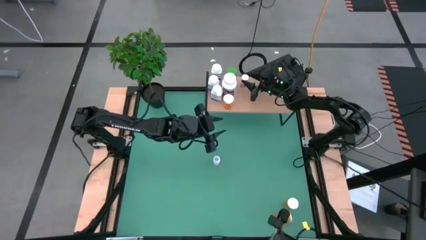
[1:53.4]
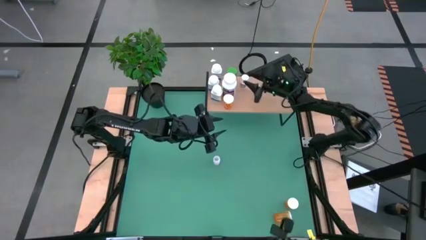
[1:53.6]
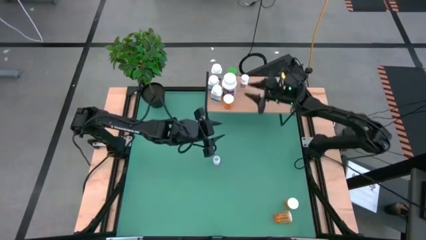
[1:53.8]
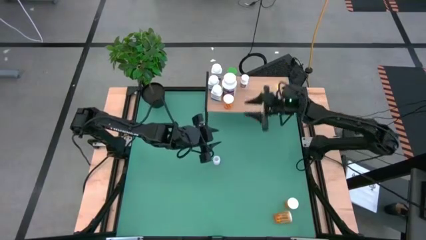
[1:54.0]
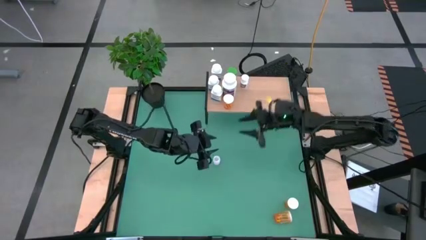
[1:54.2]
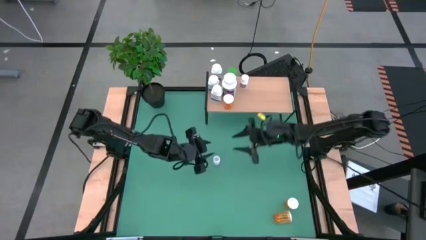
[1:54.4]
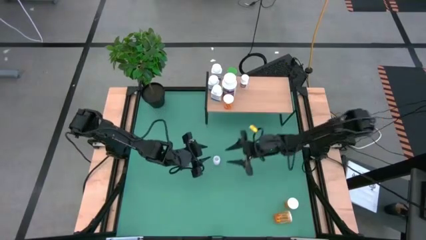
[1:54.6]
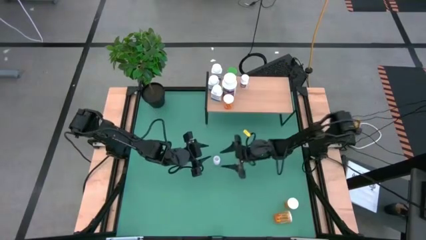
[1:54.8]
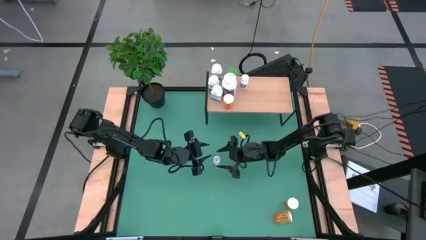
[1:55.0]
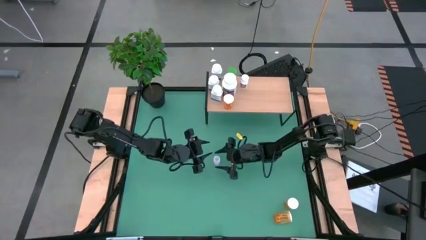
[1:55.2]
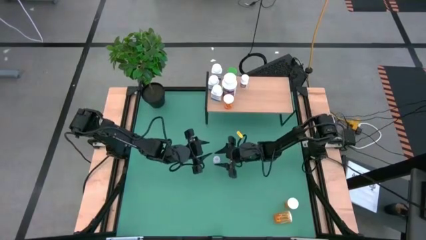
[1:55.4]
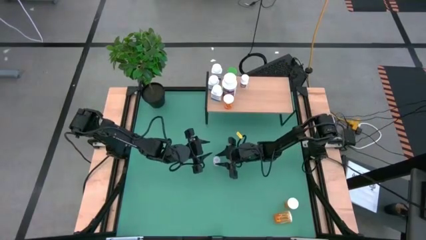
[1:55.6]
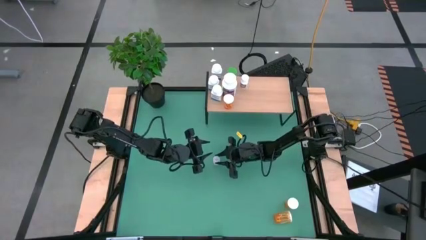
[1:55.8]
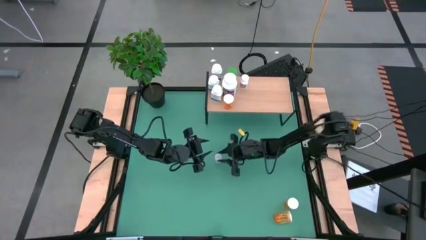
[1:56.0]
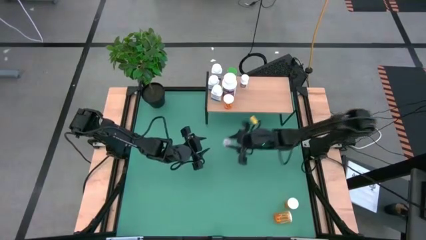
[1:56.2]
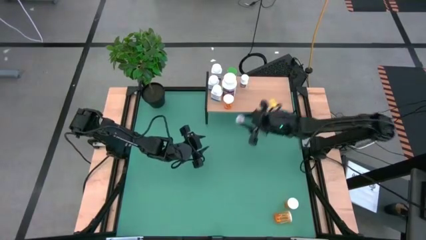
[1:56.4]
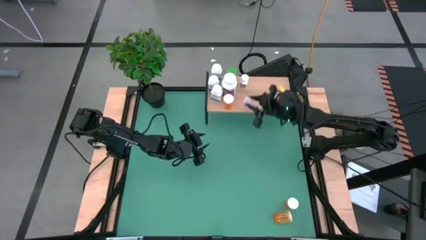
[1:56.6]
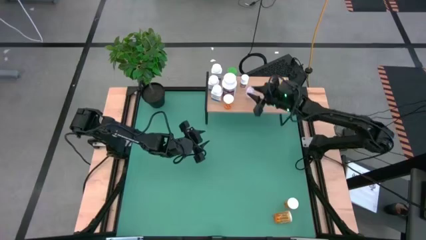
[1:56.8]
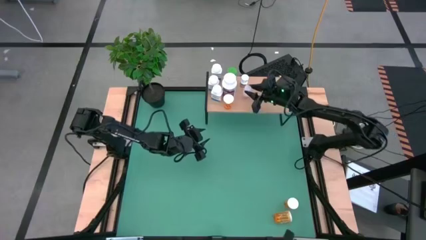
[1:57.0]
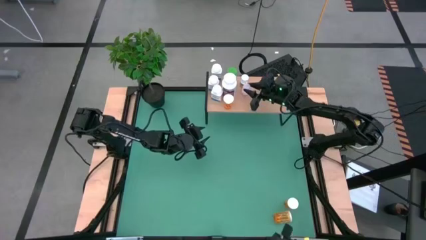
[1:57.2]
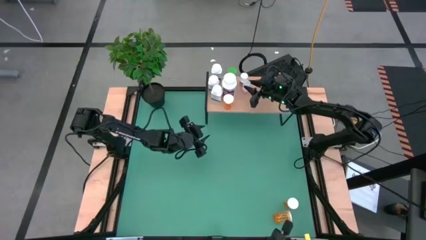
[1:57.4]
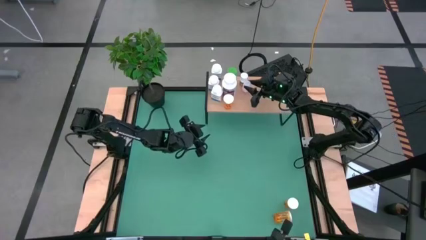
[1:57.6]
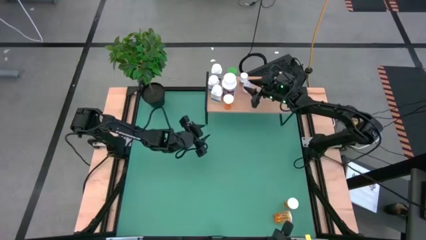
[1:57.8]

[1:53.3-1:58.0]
Task: Pick and place medicine bottles onto shelf by color
Put the transparent pill bottle on the shelf

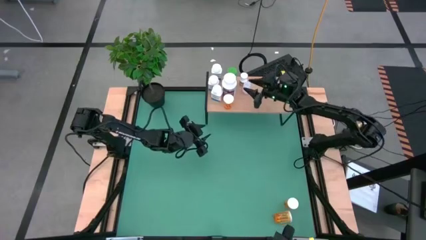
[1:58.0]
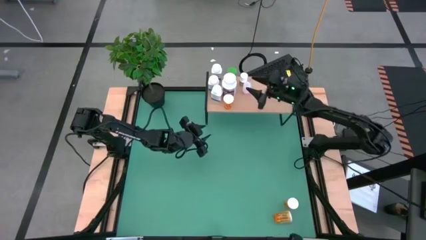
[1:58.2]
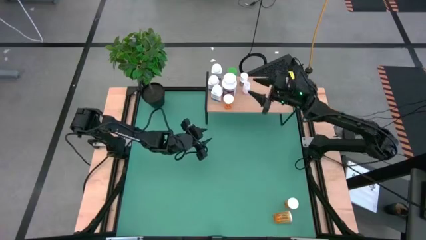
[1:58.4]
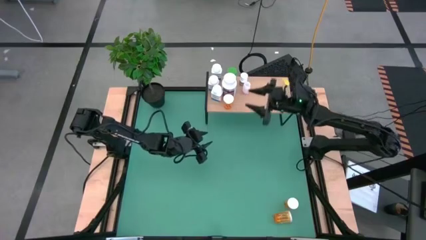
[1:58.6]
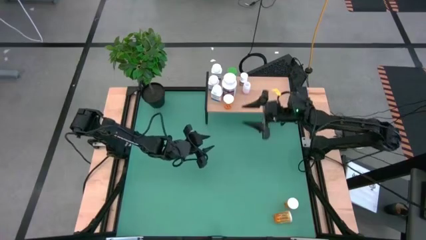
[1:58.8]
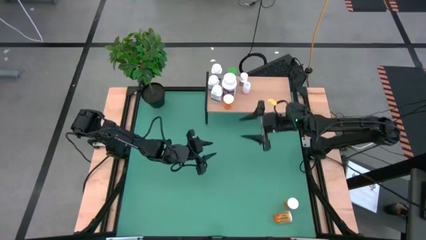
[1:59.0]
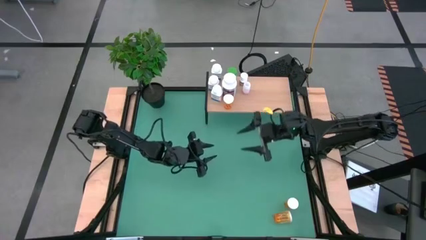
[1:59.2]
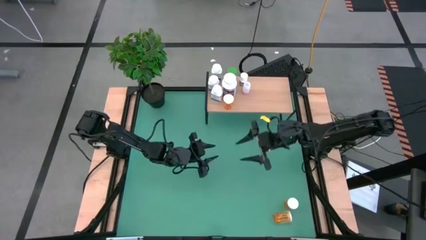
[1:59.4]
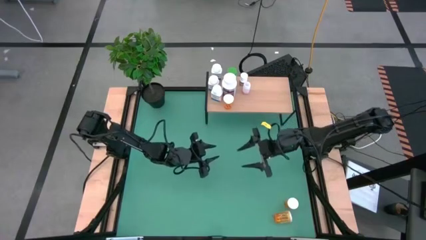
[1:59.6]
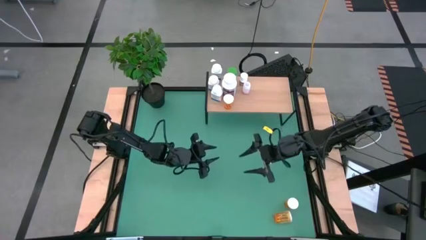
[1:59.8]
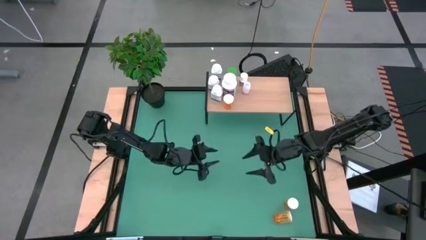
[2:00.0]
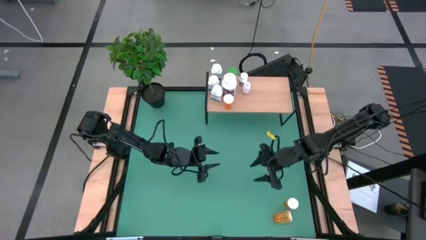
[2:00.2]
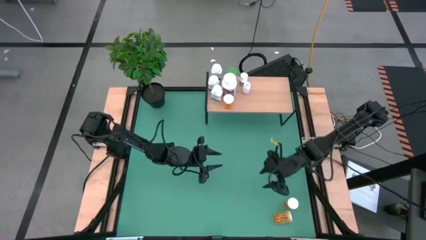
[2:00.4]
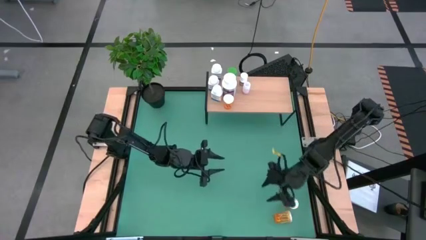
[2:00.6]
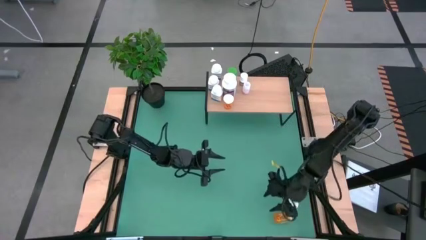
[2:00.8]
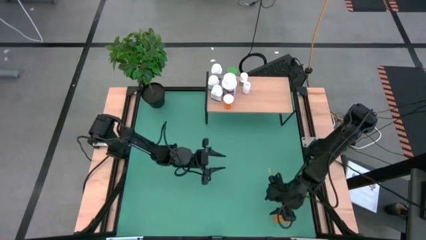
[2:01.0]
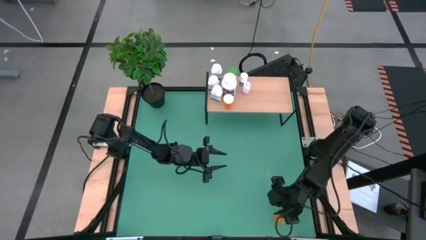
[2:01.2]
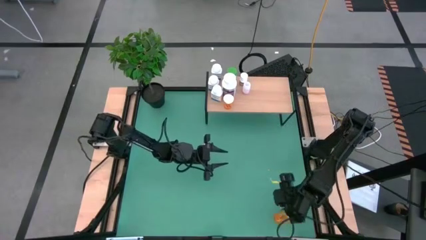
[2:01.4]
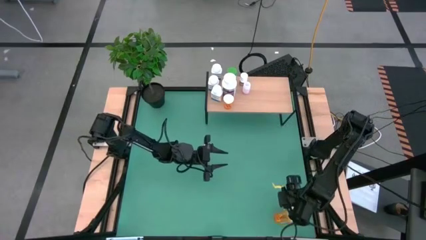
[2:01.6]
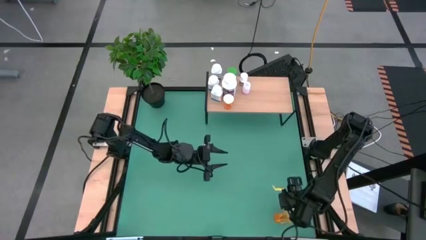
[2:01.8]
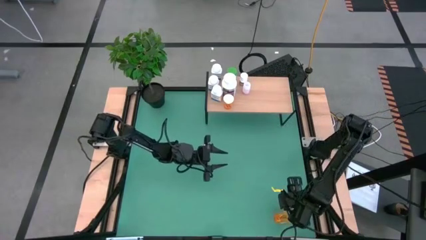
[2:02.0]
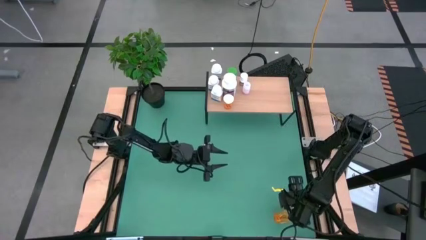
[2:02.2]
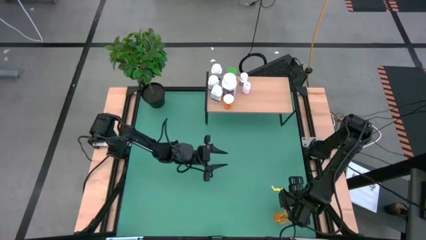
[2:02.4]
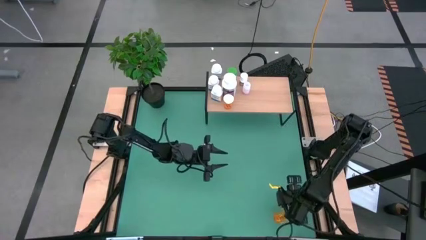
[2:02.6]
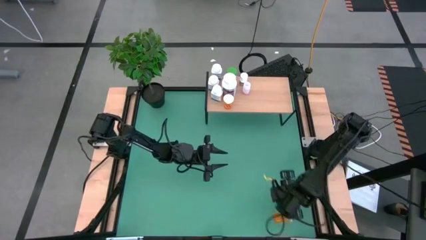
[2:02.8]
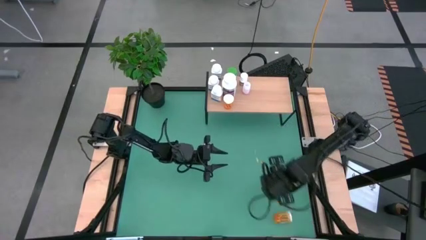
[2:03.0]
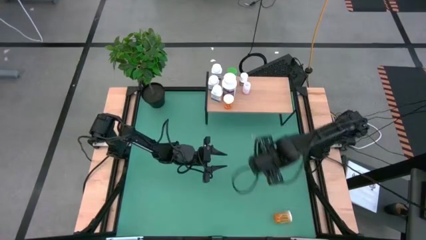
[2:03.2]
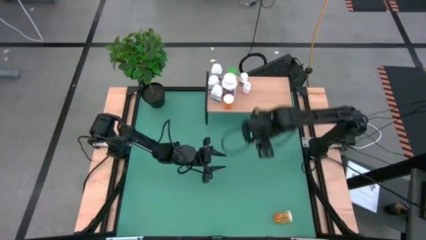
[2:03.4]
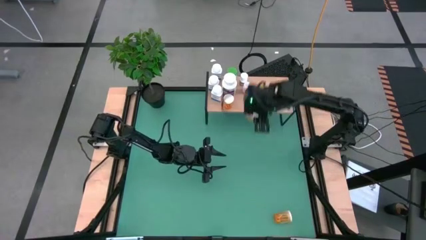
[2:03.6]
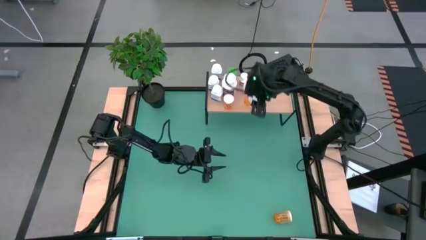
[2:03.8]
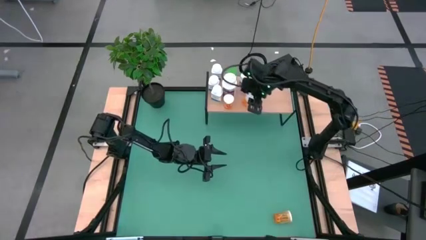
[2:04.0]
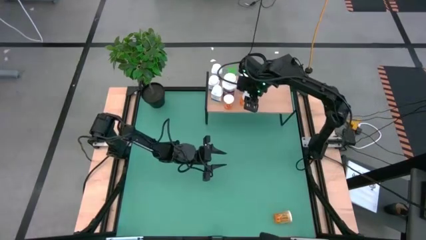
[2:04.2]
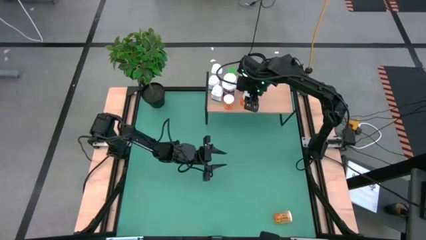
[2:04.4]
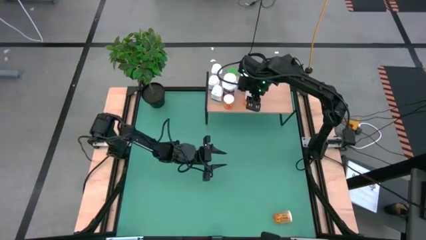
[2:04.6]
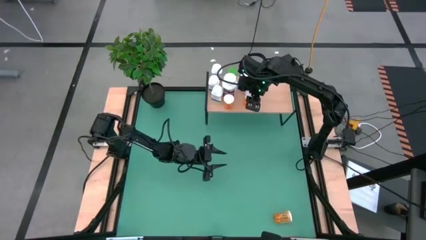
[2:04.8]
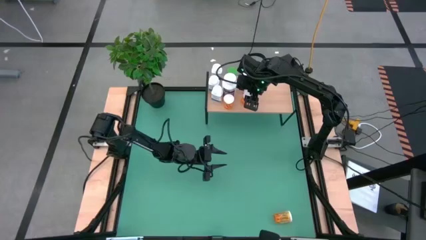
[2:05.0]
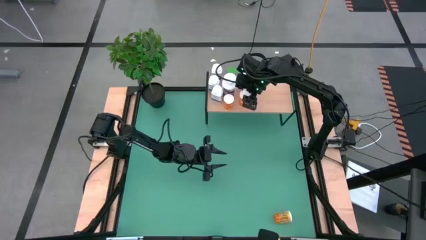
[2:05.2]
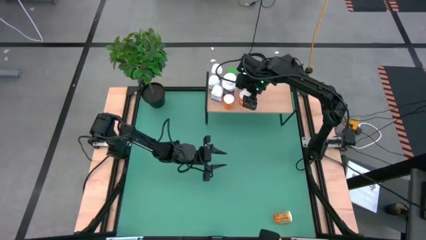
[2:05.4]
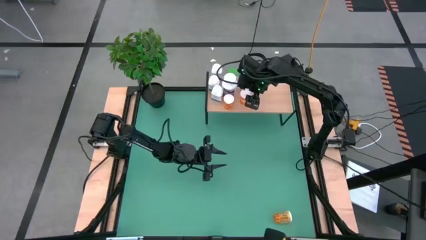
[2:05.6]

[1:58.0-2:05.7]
Put the top orange pill bottle on the shelf
